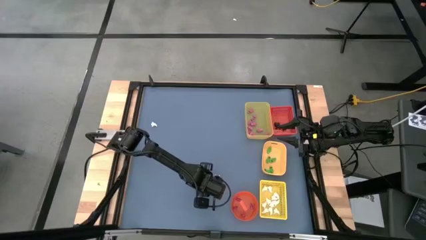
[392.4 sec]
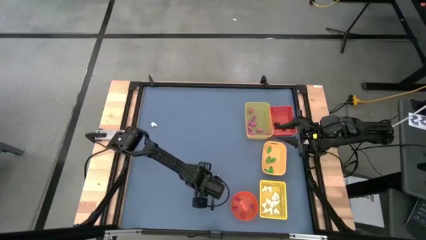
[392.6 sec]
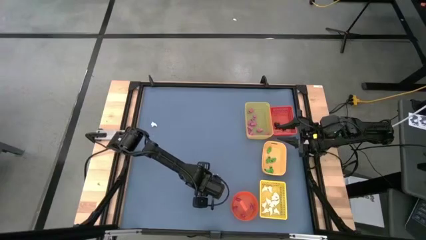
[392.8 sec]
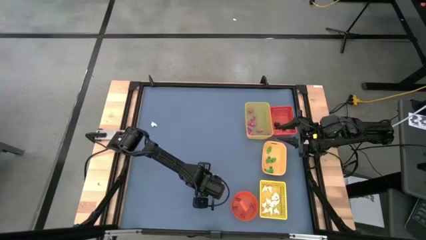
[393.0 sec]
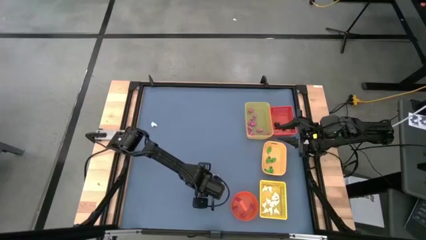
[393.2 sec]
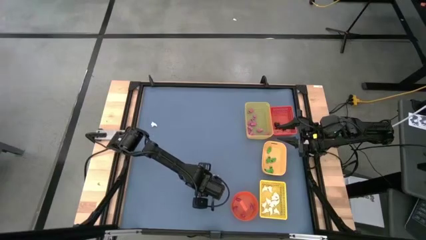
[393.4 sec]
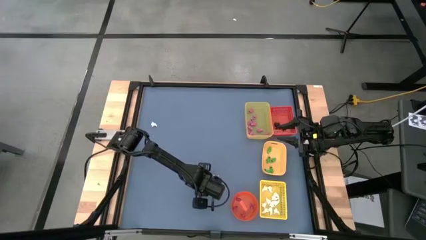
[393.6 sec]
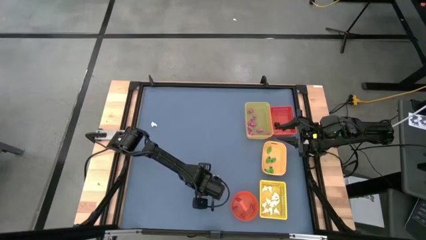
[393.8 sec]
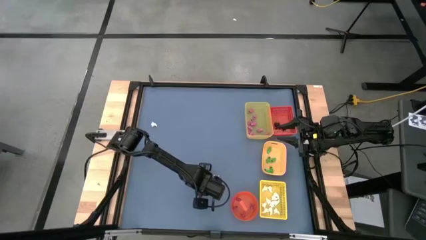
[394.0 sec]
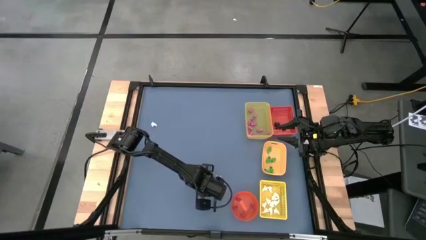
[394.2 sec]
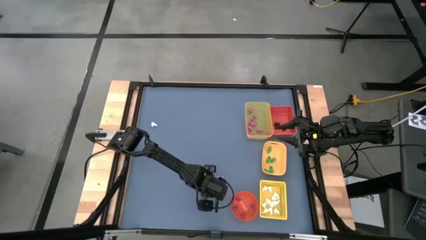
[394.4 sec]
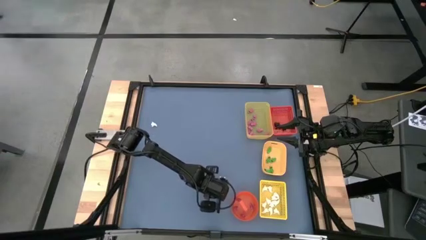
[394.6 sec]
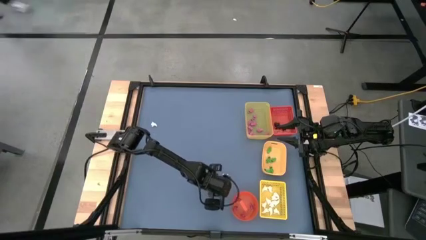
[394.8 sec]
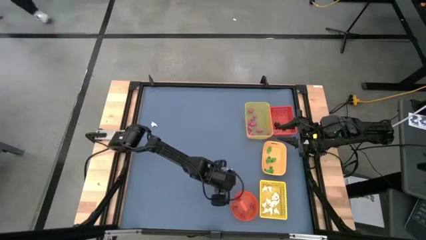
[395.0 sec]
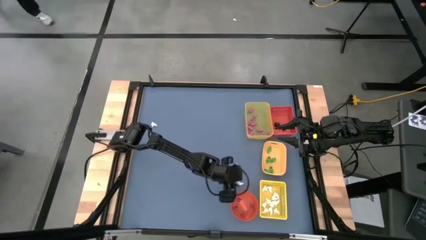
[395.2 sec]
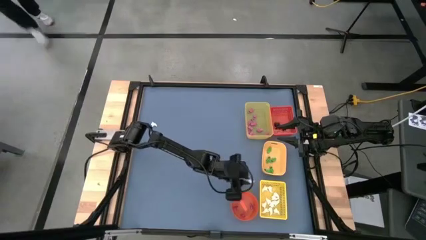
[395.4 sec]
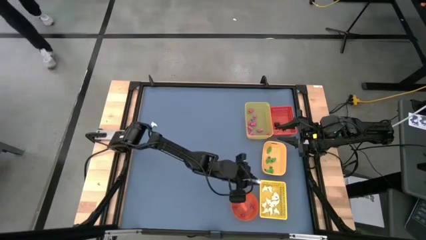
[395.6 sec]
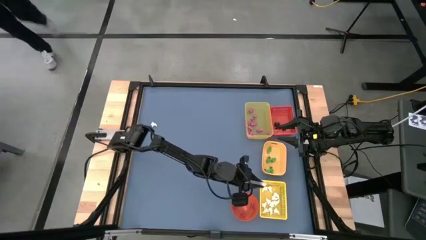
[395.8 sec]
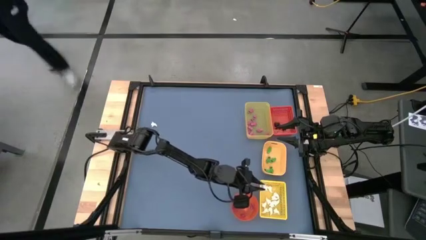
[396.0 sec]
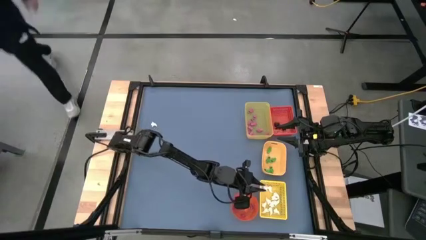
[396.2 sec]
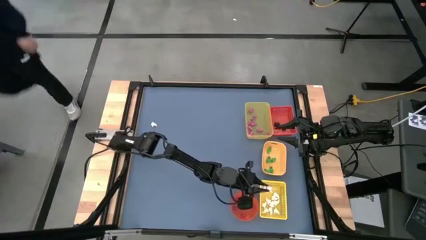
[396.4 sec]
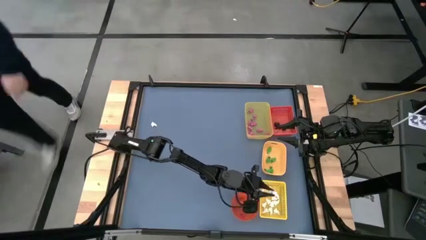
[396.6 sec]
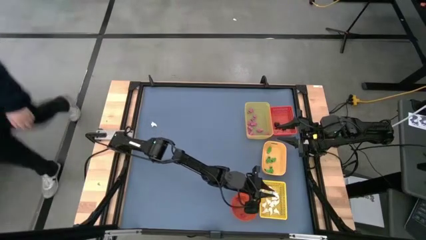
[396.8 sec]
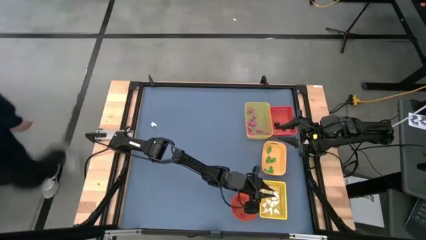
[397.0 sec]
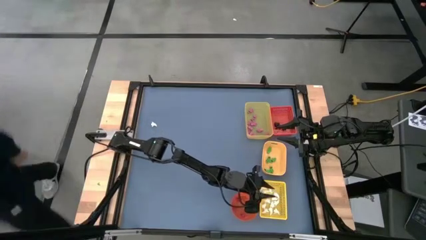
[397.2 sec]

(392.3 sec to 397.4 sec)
Task: Sort Halloween decoration
Put the white ghost toy into the yellow box

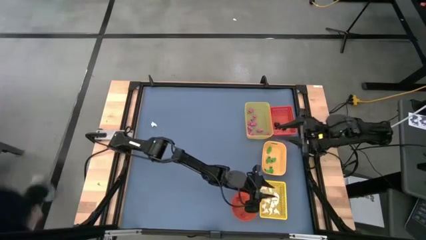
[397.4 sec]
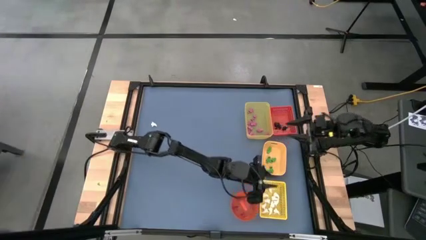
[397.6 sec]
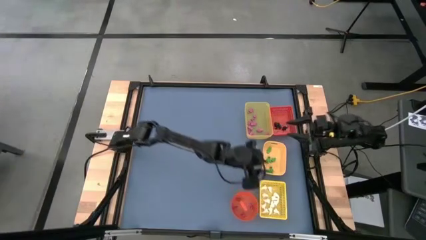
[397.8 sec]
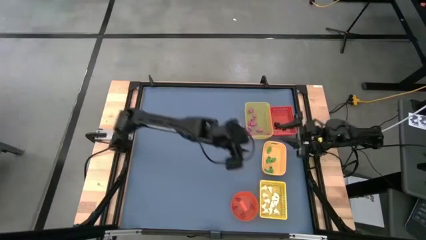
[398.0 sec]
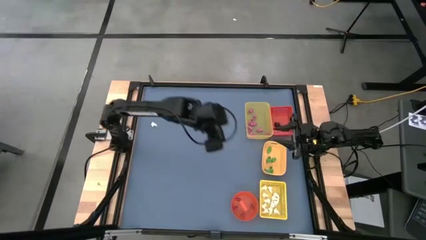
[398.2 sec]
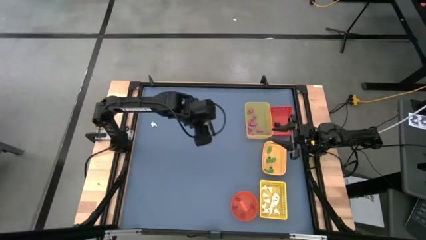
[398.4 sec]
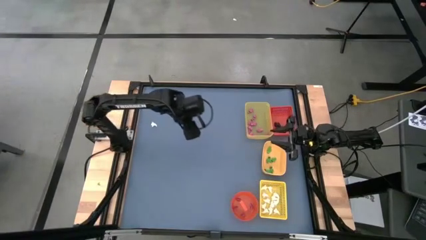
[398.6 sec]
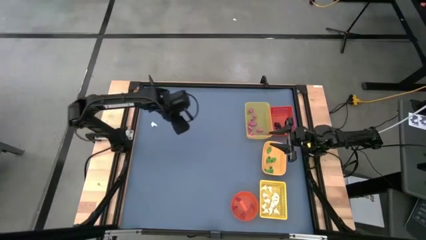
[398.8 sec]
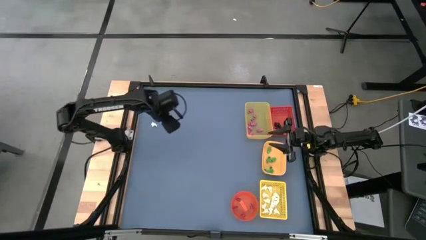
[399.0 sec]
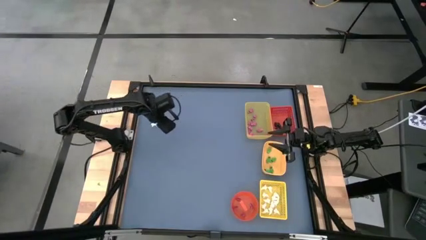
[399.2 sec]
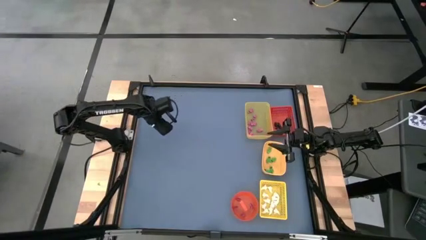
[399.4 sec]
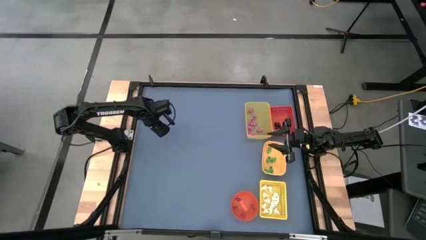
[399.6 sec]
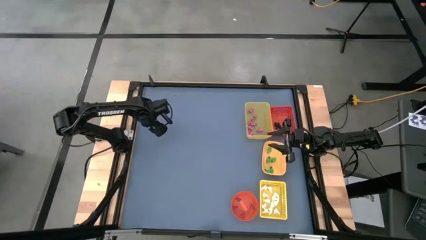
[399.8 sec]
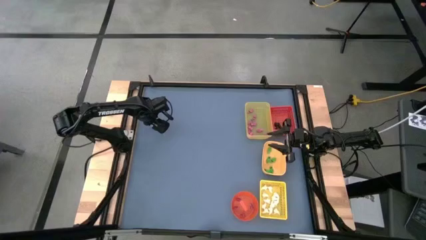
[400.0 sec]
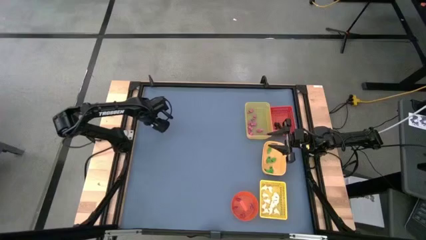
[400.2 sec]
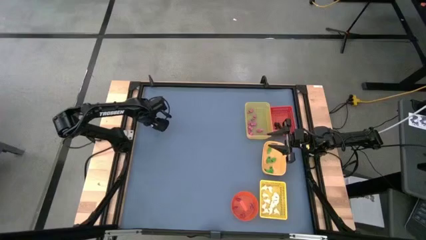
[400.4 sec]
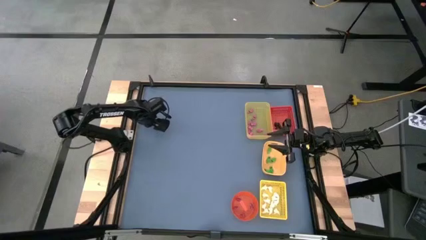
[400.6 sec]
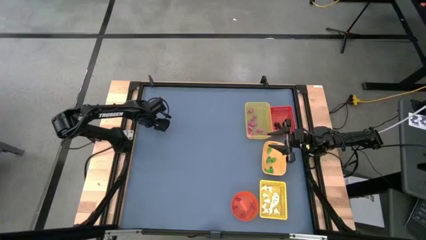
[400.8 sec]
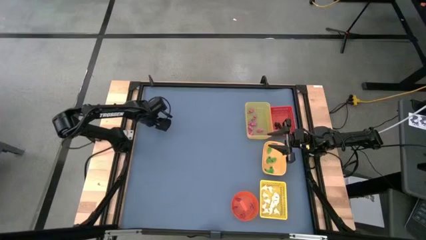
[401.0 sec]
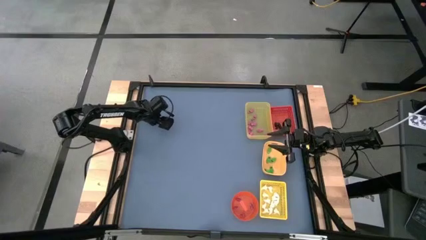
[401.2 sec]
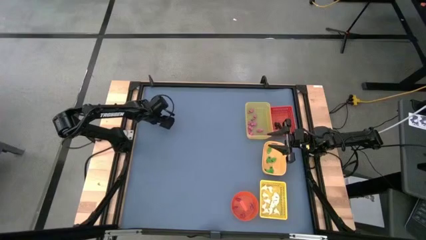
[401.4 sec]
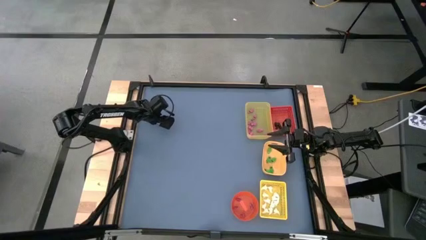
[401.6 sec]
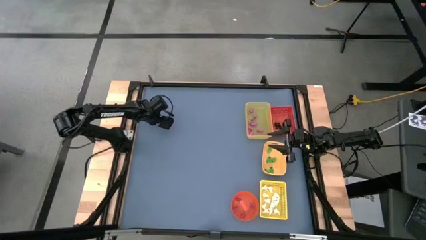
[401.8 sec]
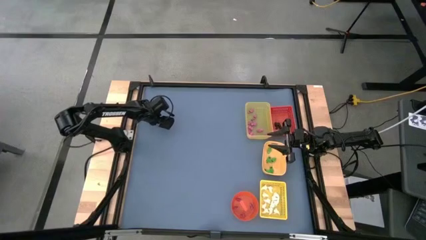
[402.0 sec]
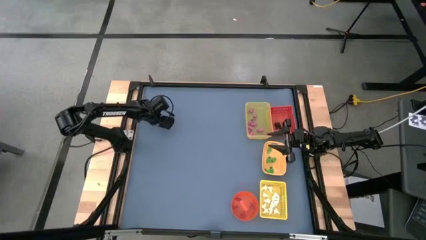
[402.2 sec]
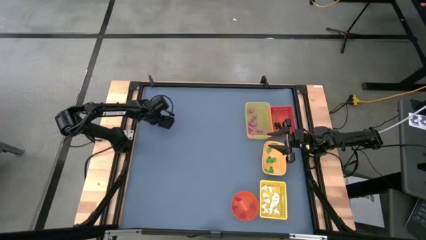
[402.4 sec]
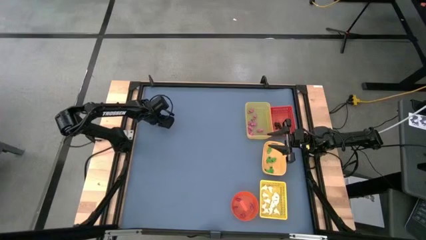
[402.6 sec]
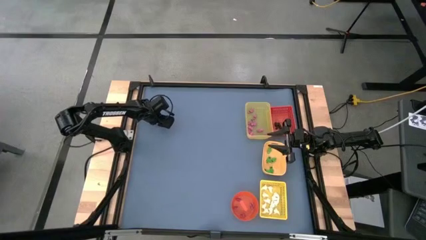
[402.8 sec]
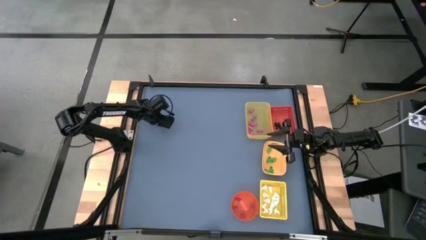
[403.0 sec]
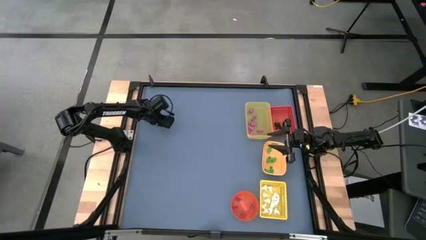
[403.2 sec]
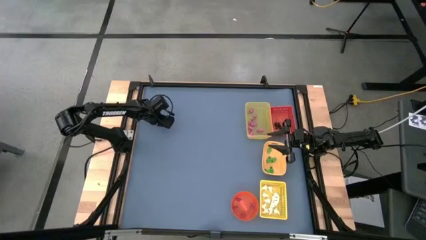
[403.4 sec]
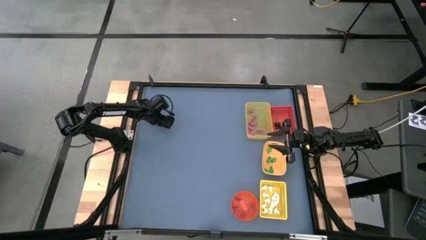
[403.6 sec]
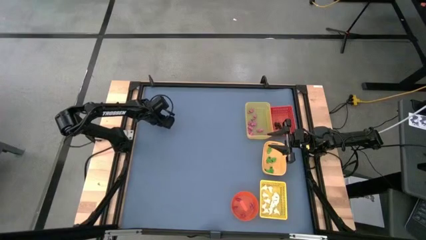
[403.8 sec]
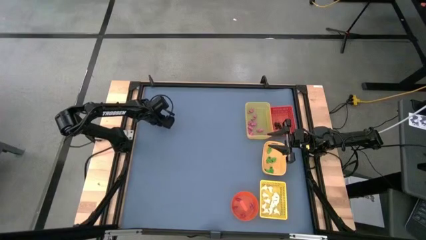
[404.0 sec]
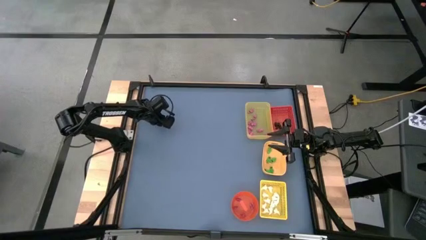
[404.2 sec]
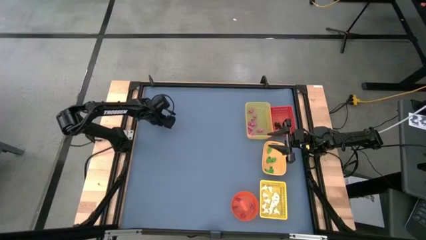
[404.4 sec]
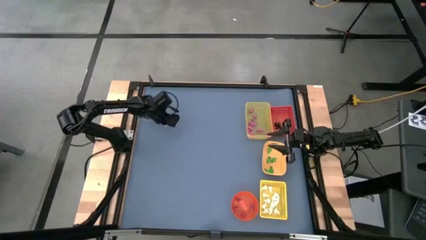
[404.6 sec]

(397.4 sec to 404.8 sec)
Put the white ghost toy into the bottom yellow bin
